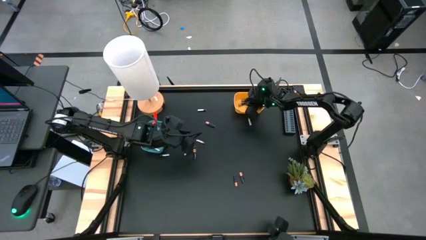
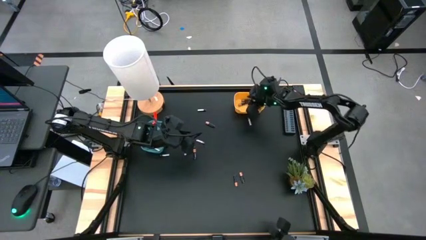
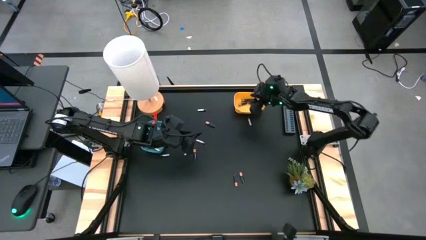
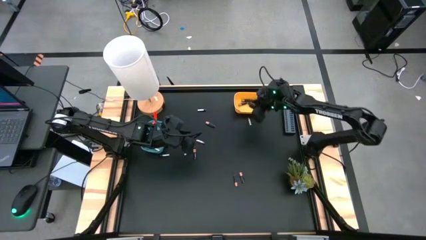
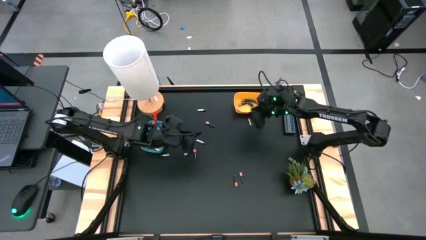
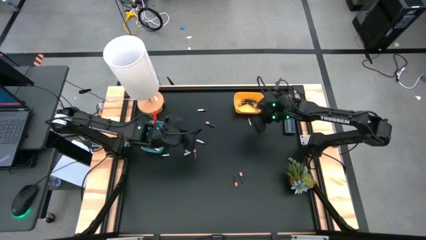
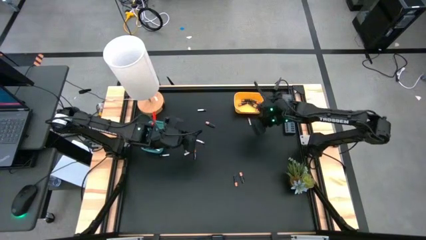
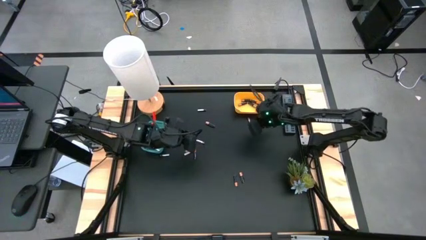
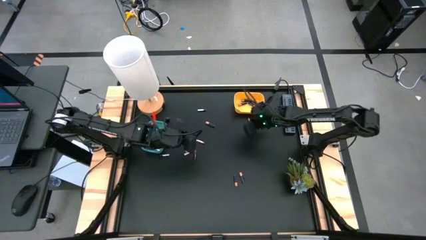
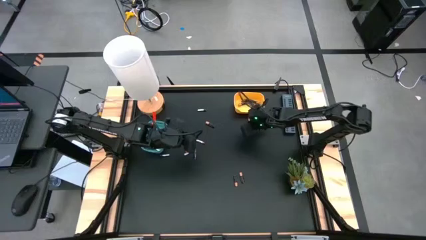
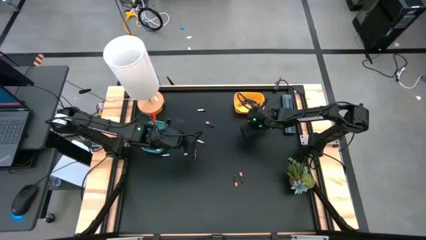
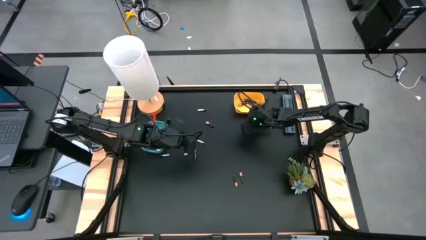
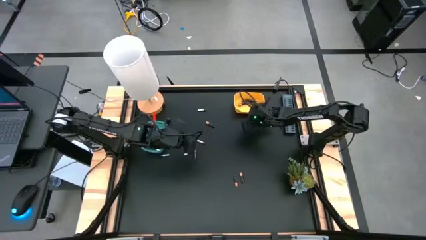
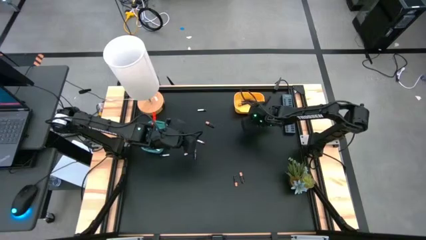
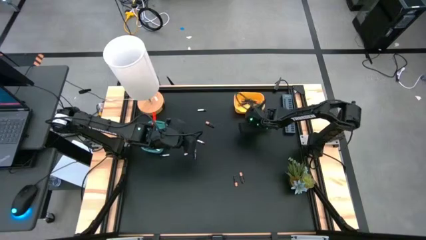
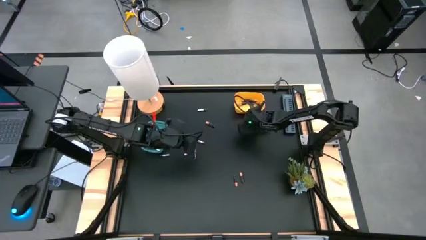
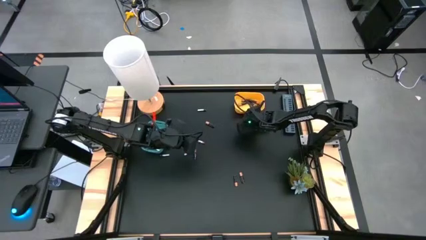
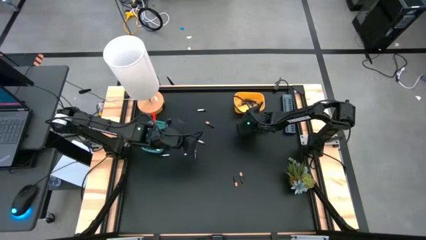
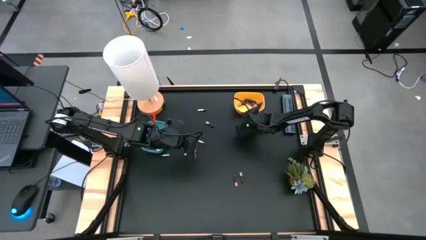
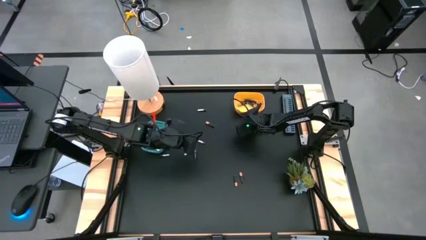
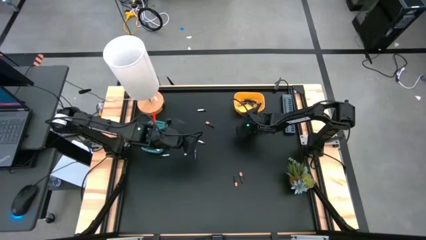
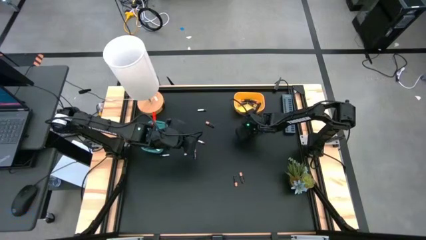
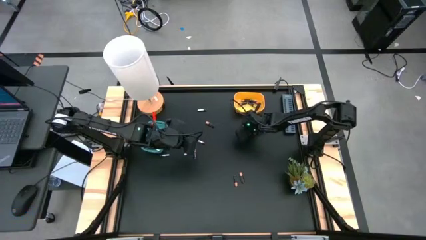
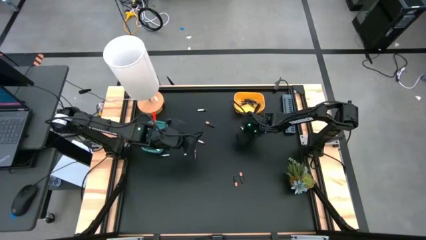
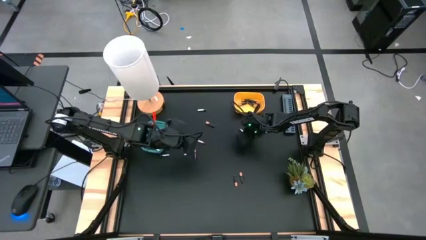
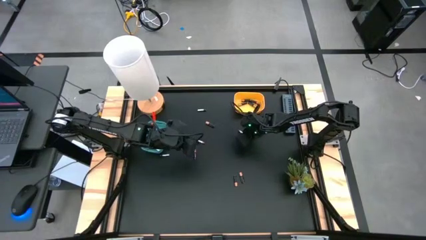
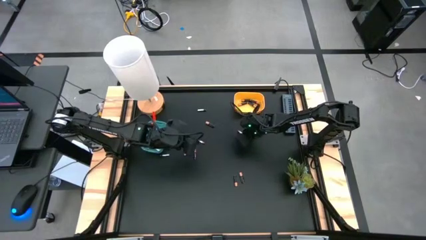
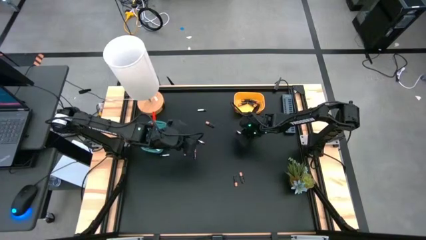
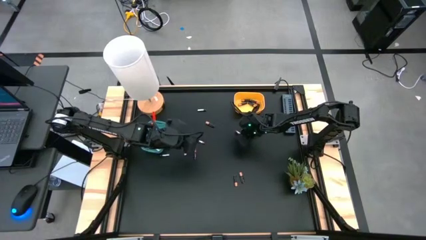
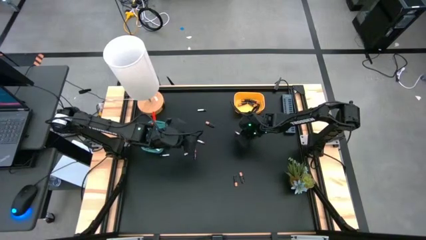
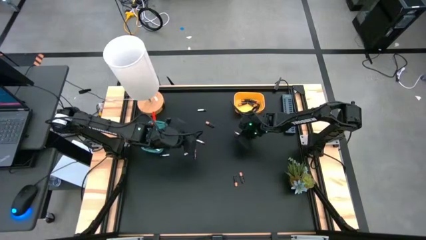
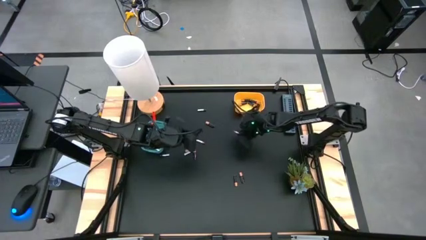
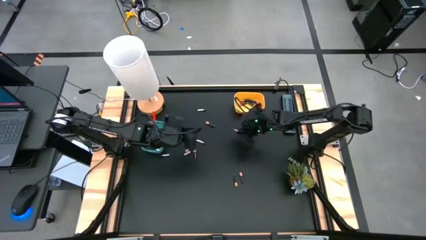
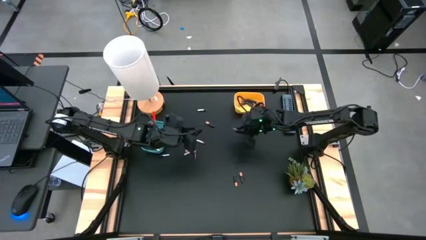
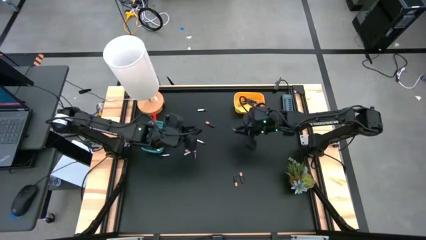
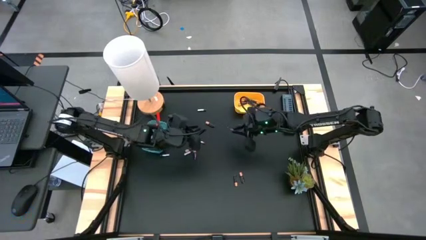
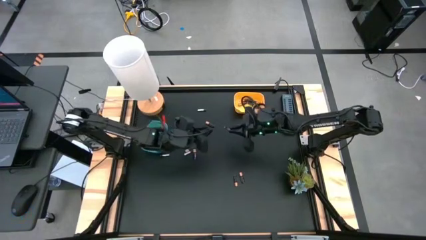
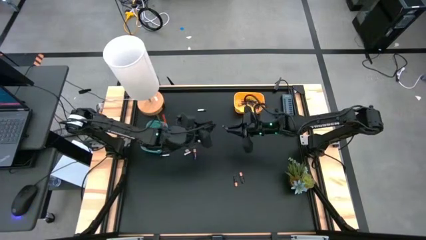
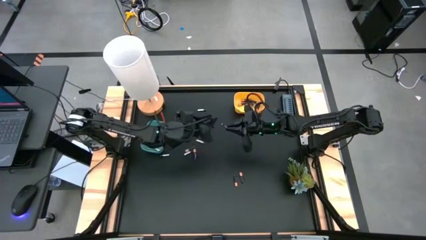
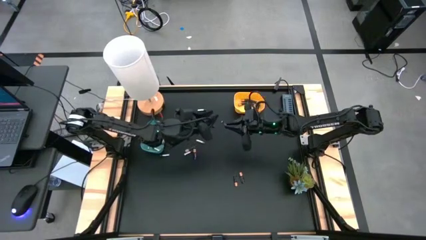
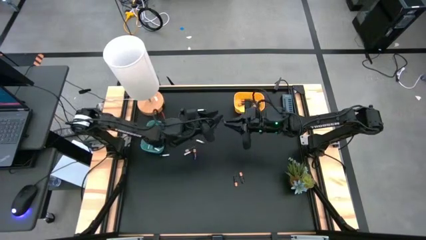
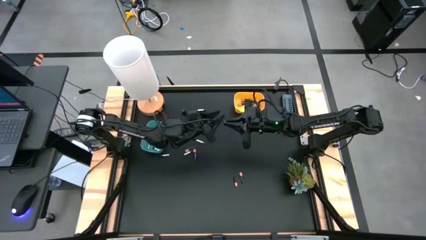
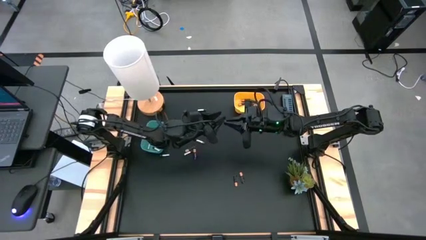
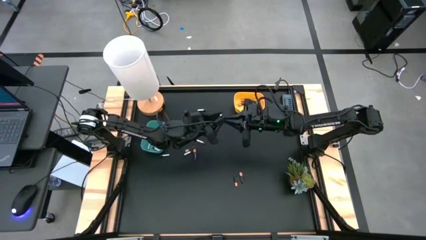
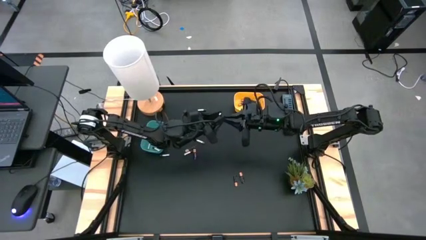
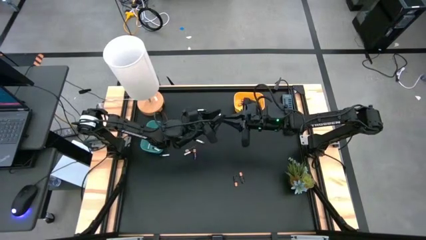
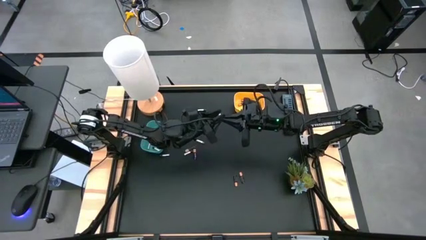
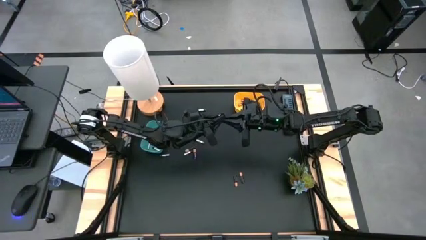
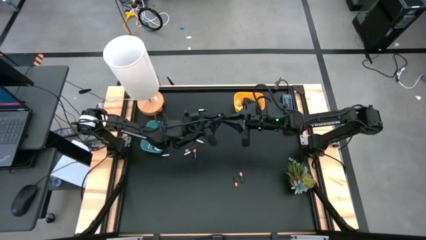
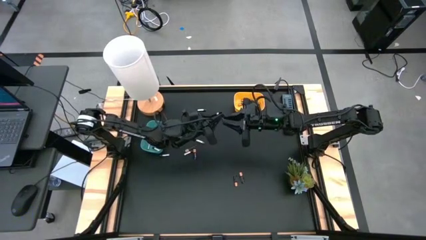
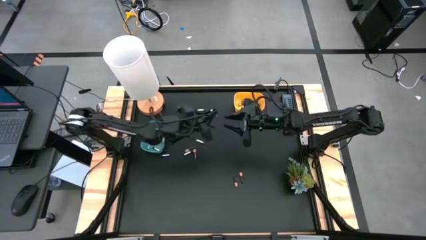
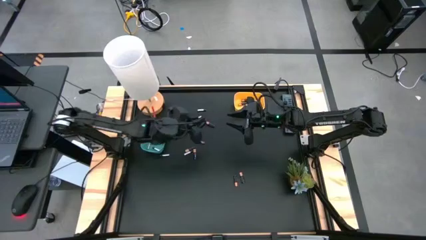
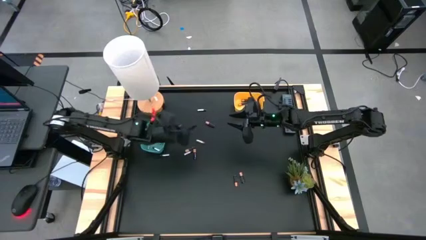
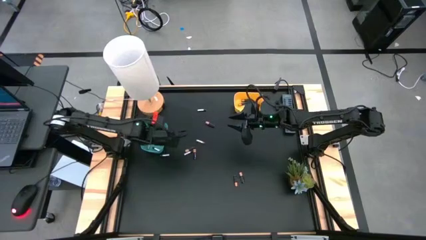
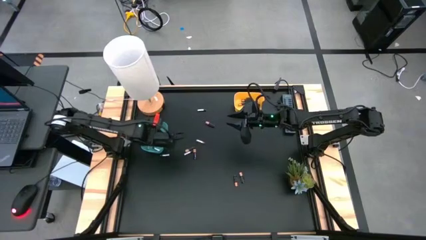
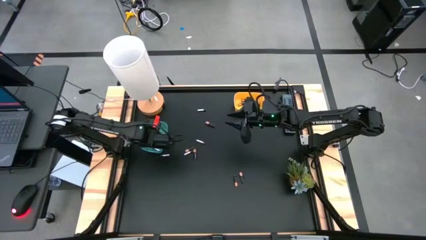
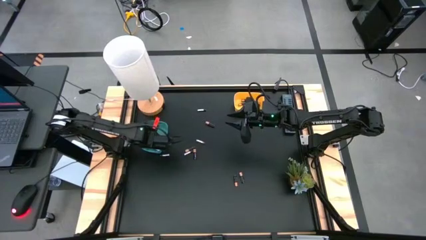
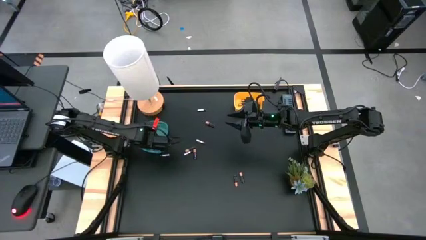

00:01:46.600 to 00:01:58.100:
Task: Sort batteries
Put the silver battery into the green bin

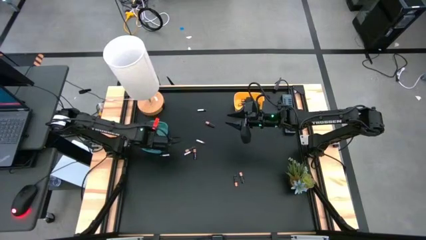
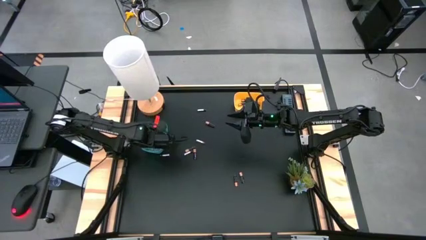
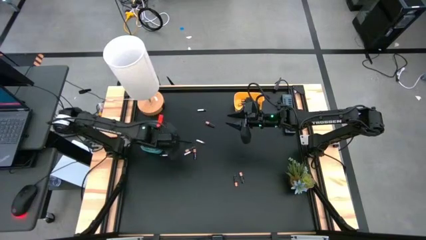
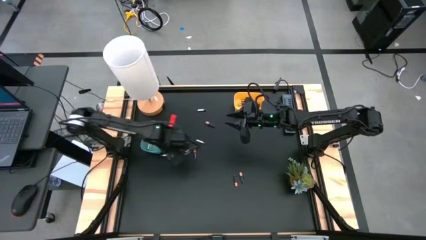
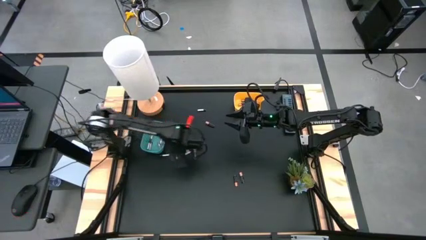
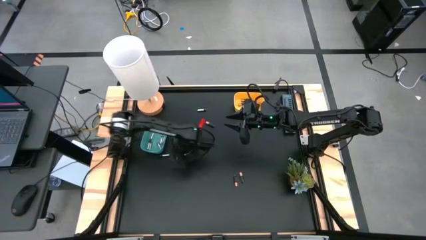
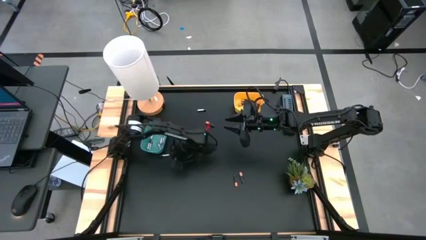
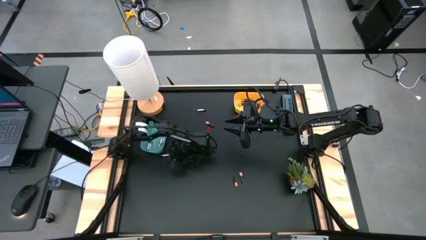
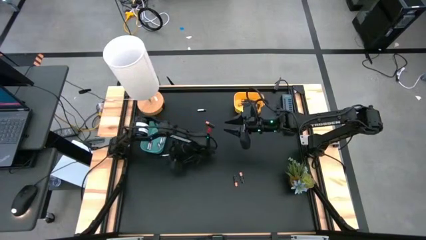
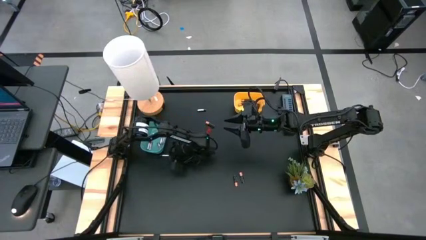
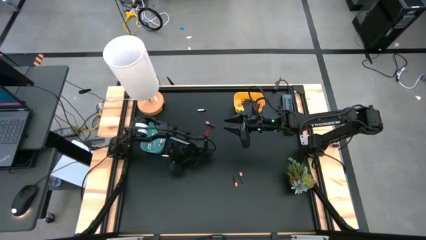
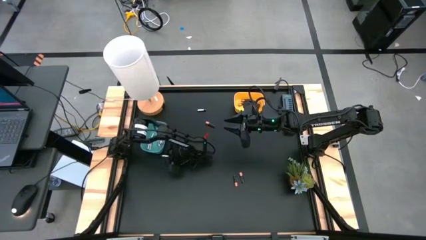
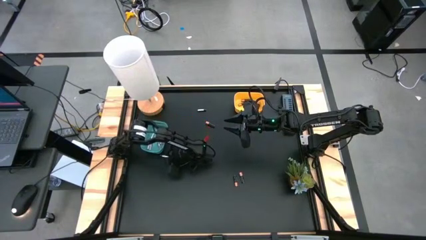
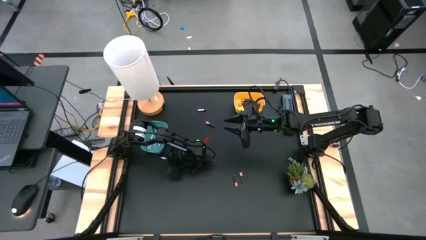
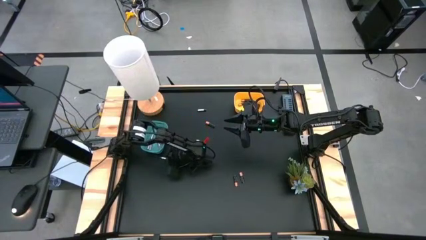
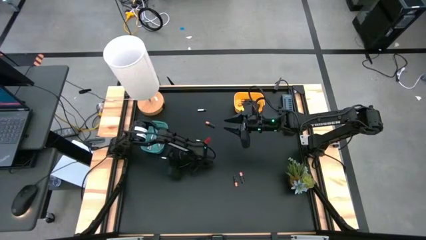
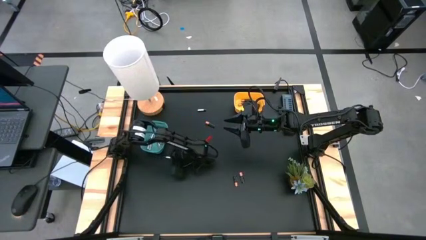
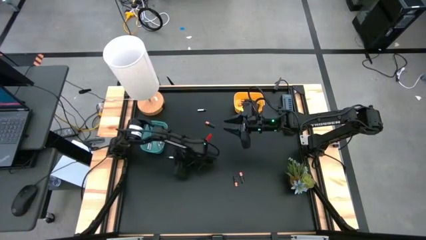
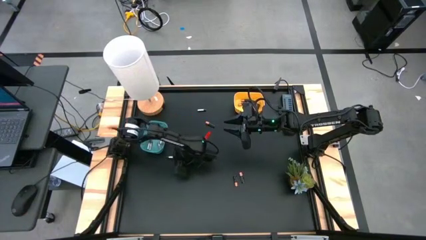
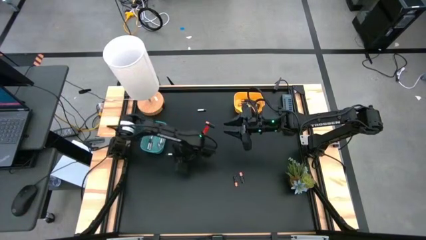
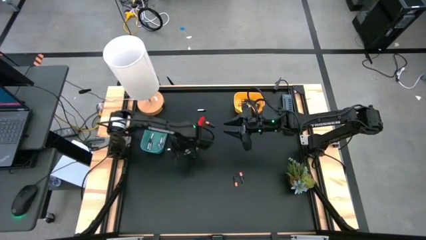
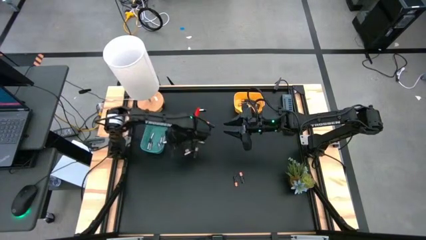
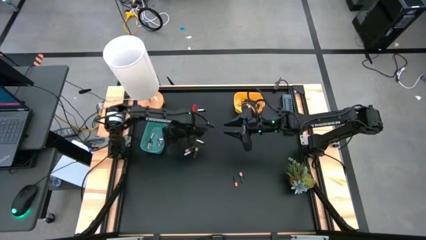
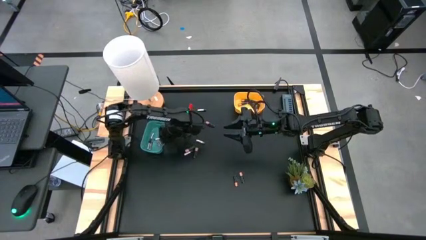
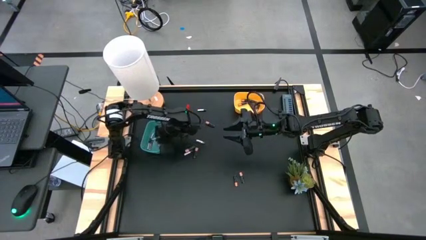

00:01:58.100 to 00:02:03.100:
Put the silver battery into the green bin
